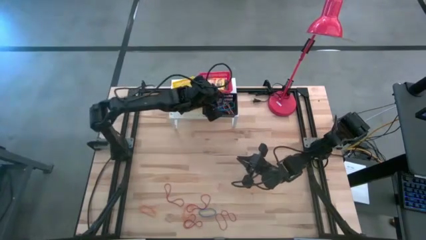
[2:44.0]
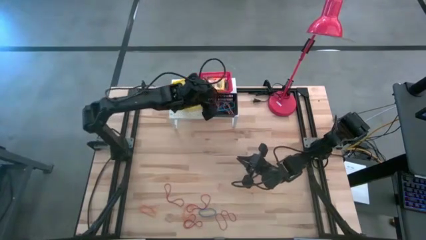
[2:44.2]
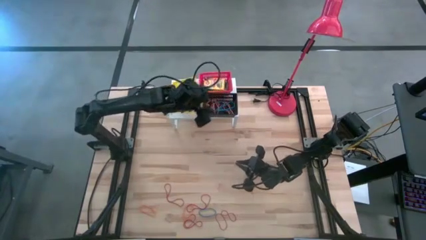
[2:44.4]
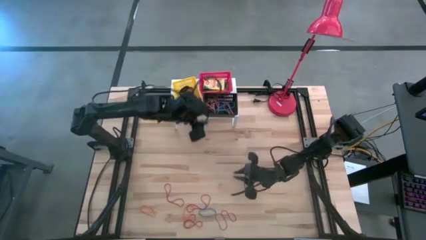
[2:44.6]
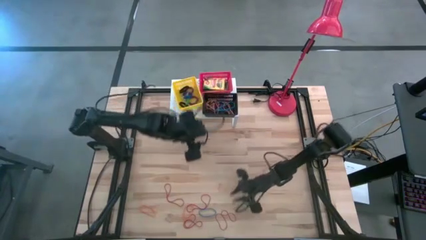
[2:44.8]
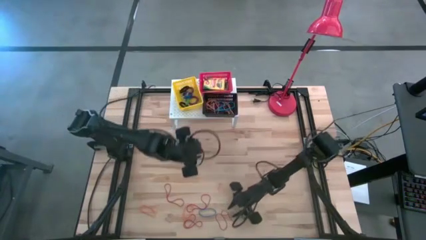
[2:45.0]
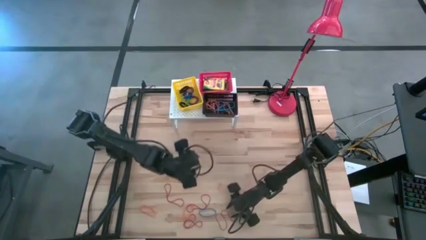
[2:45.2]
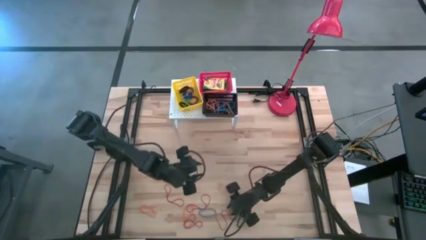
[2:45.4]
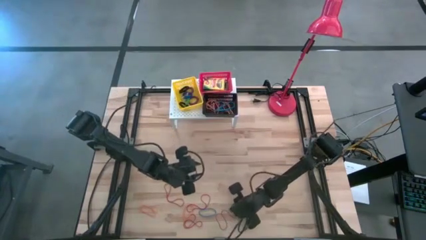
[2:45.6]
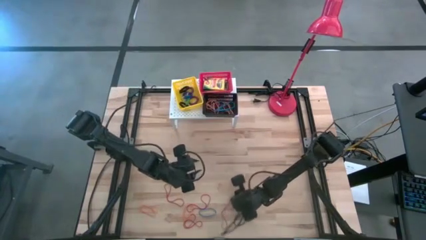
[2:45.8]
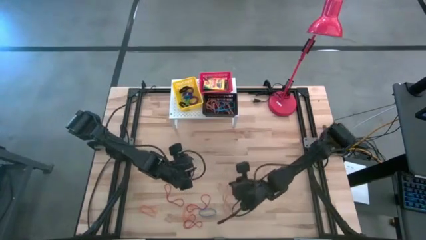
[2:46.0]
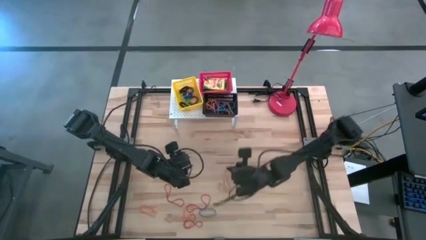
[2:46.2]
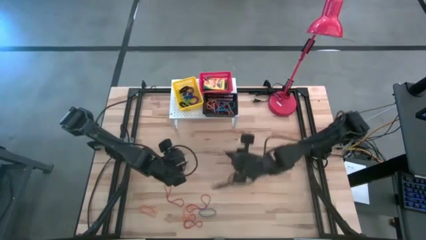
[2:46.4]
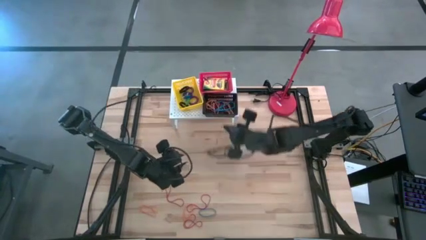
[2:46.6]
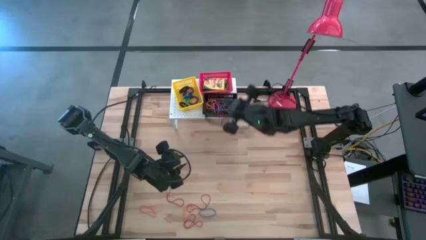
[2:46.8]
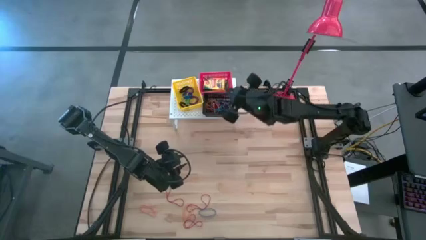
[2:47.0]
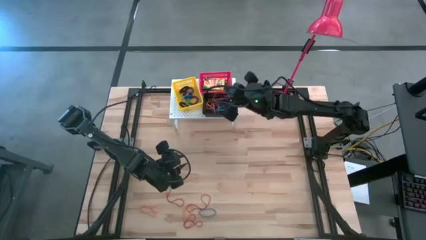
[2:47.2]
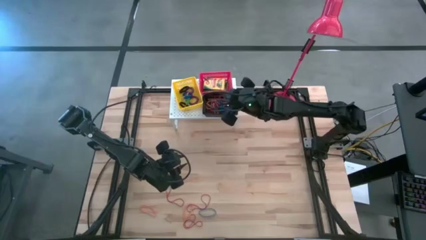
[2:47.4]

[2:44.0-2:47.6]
Task: Pick & Place Office Desk Supplies
Put the red rubber band into the black bin on the shelf

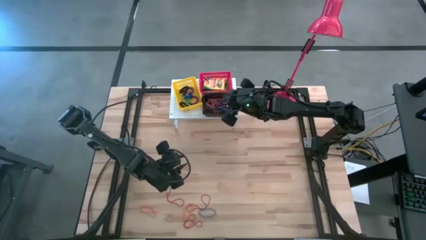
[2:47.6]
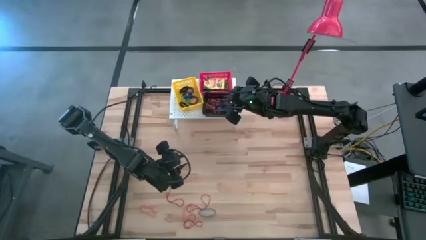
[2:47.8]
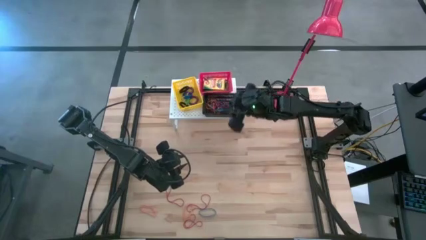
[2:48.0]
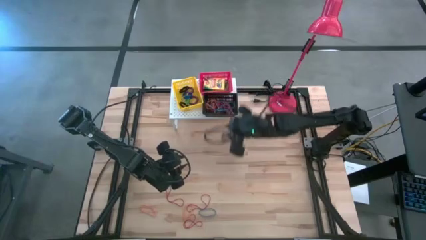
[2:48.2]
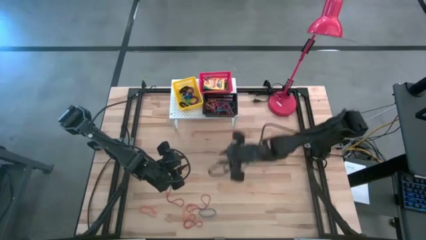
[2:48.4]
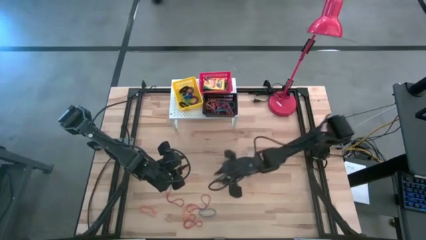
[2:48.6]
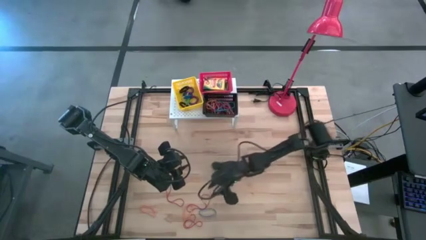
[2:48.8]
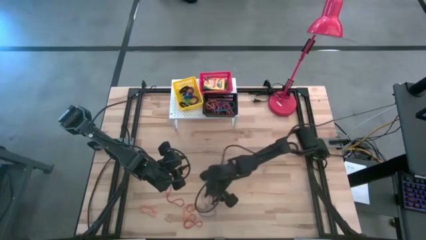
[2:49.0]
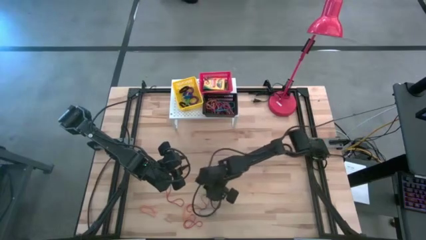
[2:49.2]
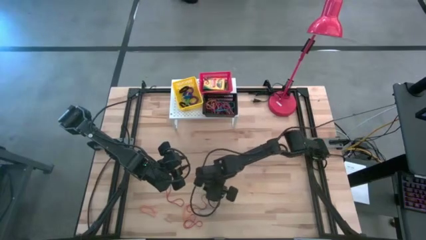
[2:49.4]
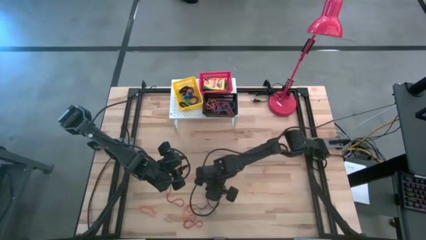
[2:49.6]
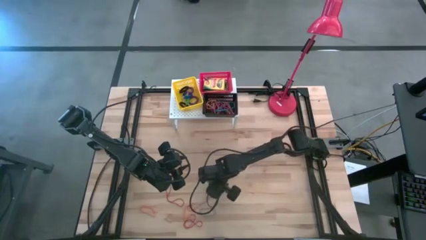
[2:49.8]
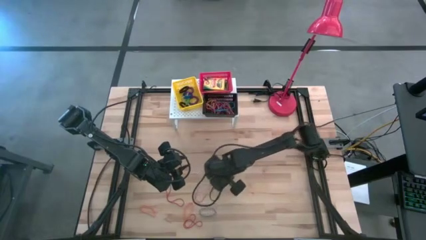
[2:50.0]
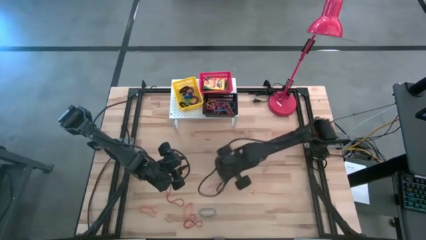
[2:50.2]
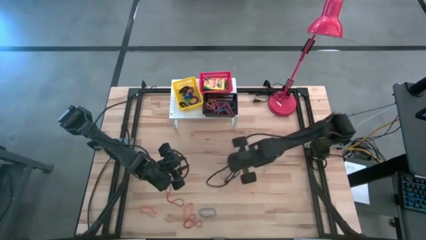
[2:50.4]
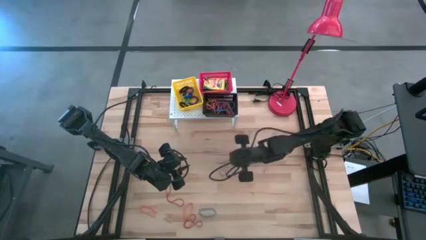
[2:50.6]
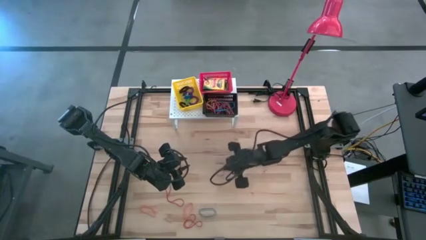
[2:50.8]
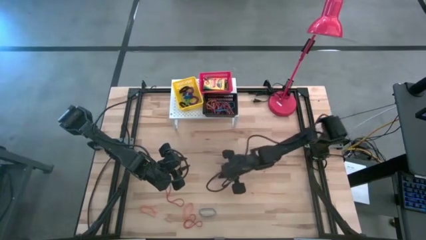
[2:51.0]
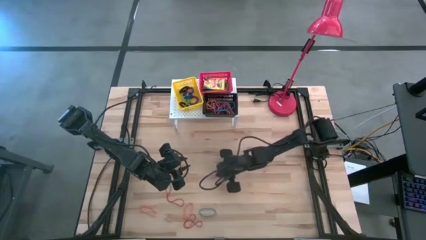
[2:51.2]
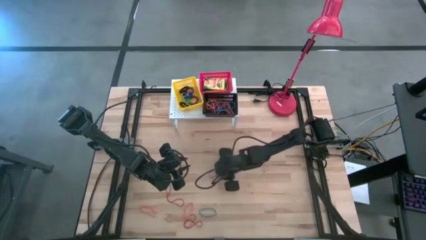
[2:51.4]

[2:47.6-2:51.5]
Put the red rubber band into the black bin on the shelf

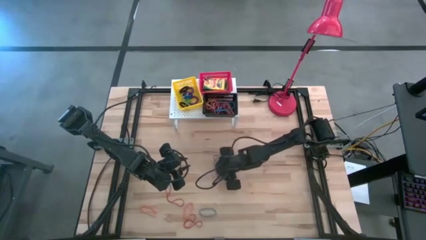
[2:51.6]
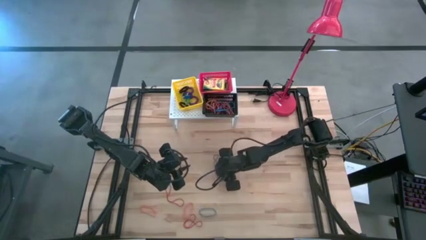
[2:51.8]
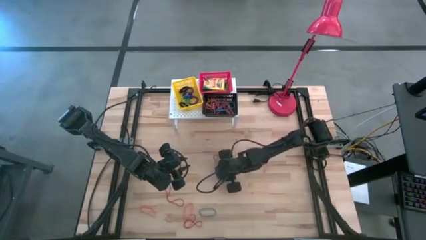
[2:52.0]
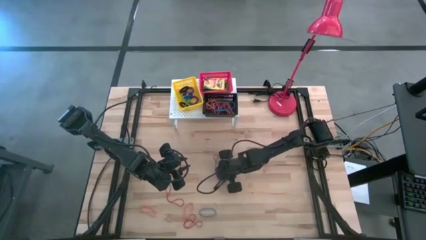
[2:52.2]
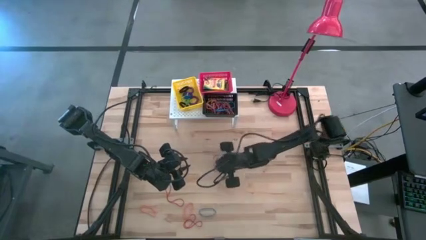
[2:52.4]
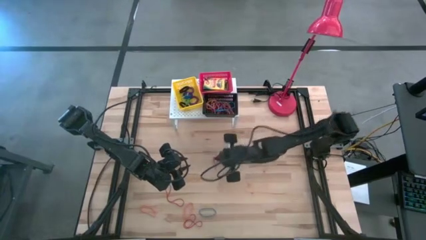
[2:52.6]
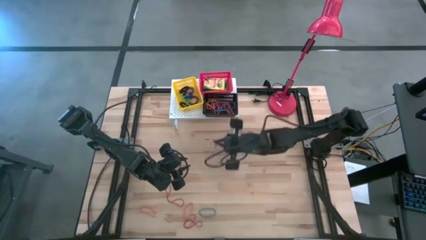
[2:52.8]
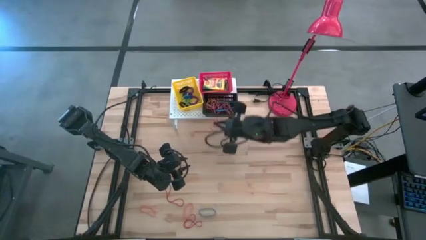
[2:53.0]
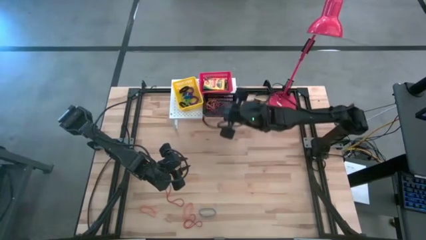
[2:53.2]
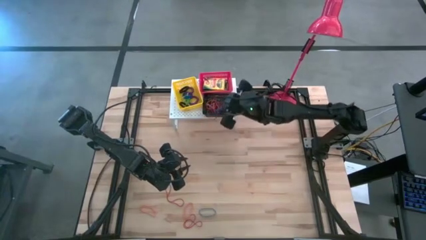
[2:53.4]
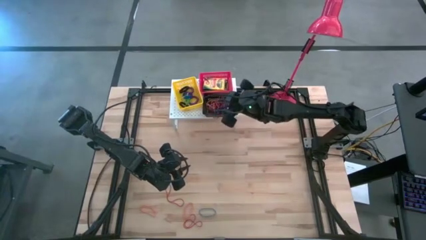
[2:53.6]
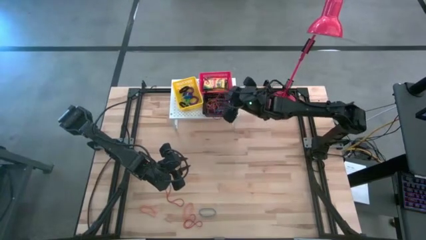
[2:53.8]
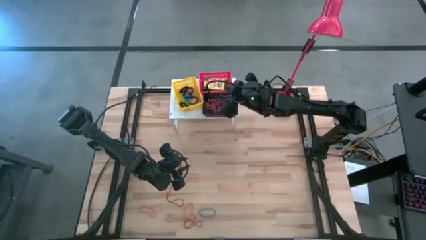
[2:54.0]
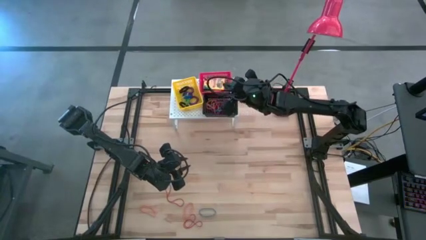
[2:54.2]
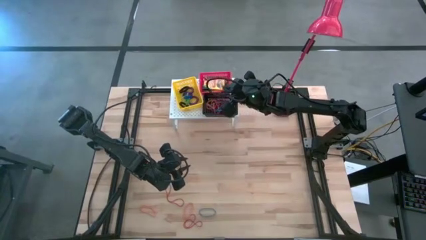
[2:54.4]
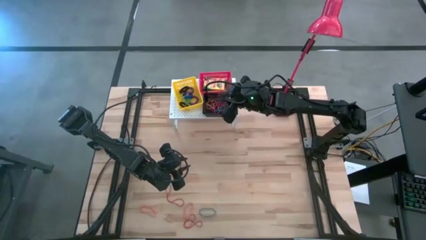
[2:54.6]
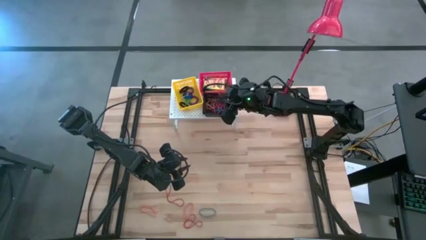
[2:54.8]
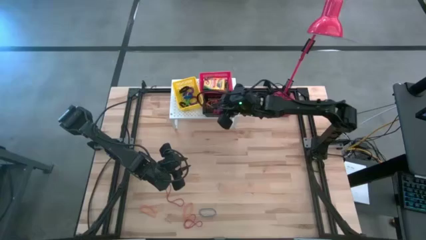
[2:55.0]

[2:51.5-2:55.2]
Put the red rubber band into the black bin on the shelf

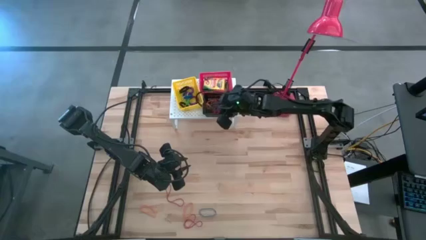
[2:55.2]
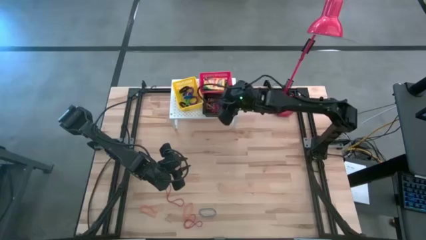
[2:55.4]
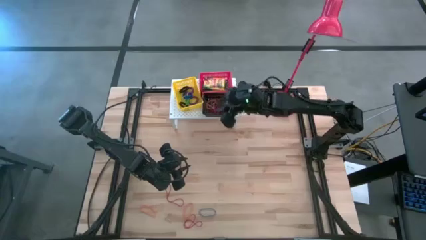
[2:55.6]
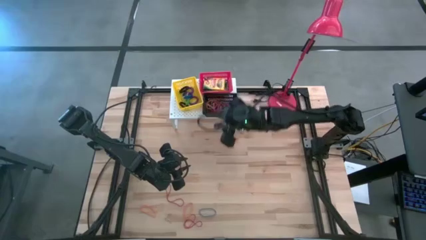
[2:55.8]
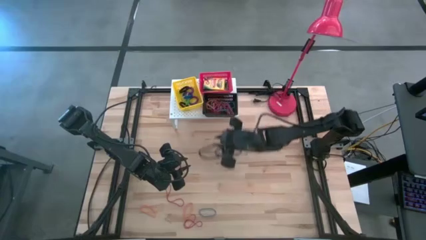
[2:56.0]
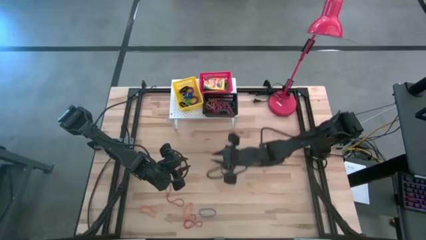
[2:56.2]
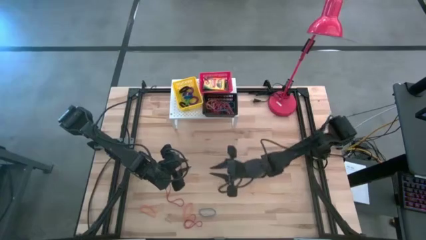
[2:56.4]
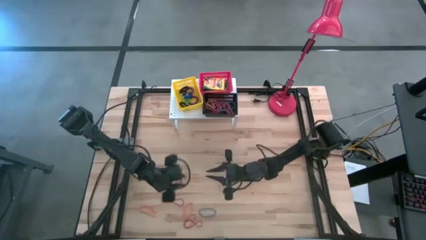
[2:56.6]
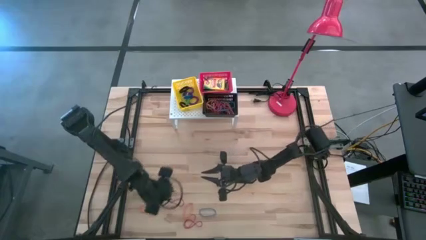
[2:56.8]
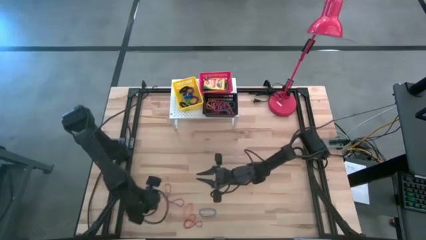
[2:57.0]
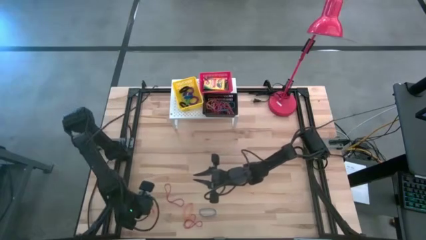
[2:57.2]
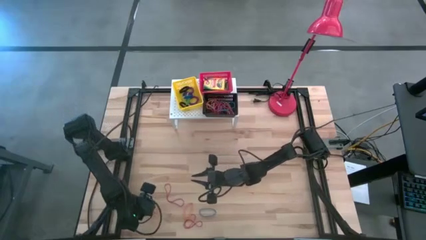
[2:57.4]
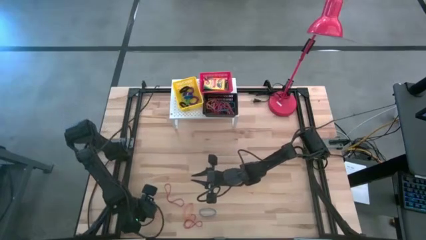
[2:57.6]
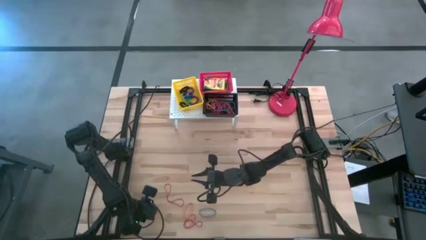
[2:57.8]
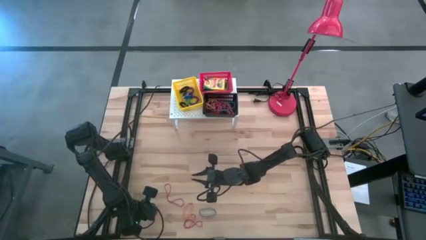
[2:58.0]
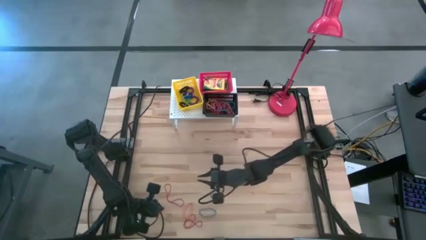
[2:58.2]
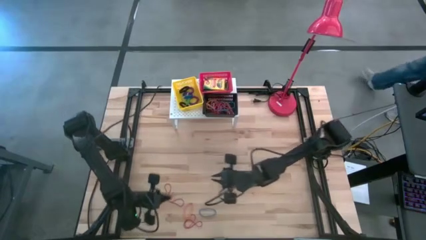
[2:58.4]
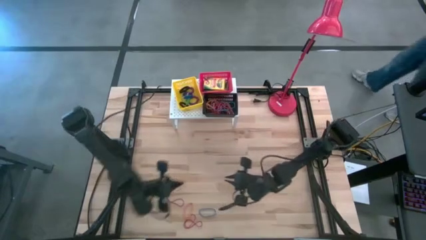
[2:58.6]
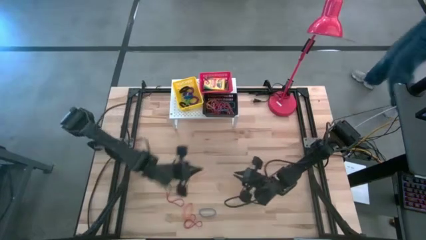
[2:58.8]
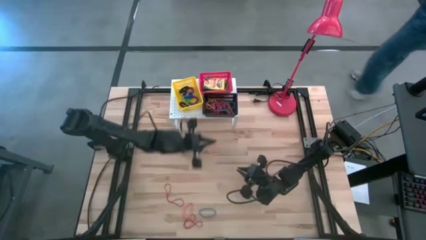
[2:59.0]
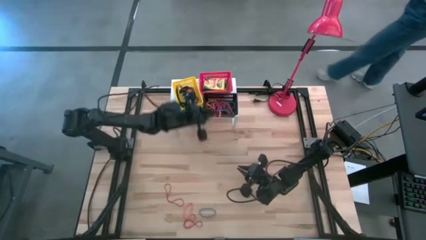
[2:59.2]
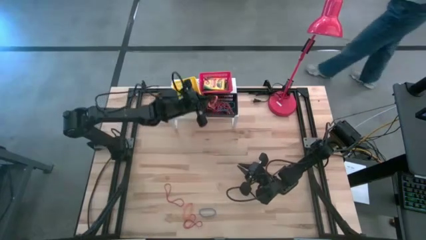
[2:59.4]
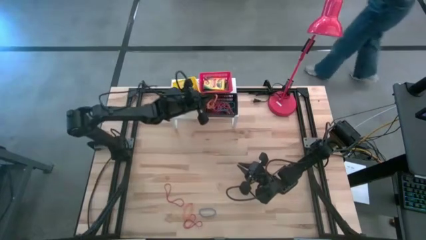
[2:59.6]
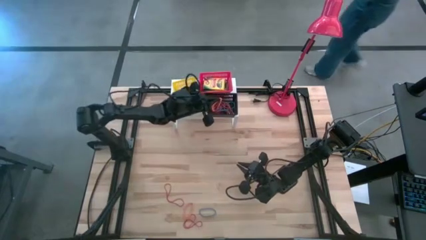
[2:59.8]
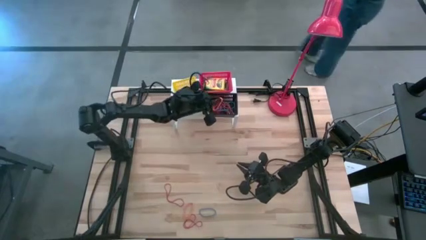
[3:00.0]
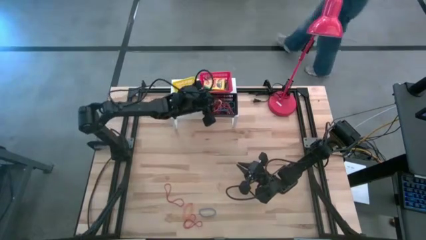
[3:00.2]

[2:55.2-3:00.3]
Put the orange rubber band into the black bin on the shelf

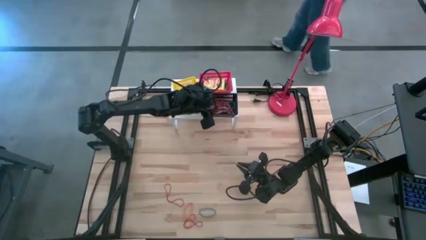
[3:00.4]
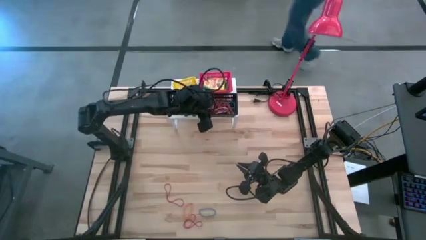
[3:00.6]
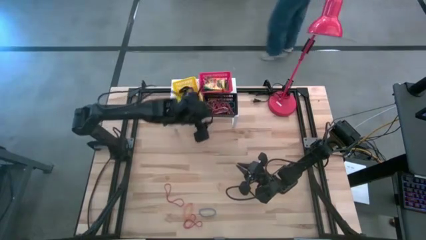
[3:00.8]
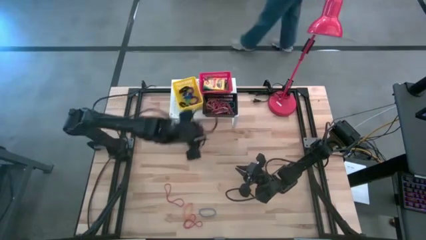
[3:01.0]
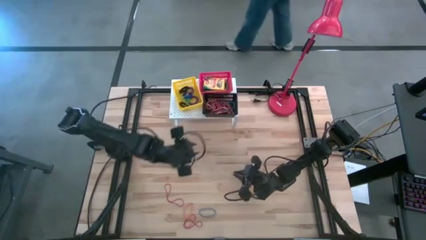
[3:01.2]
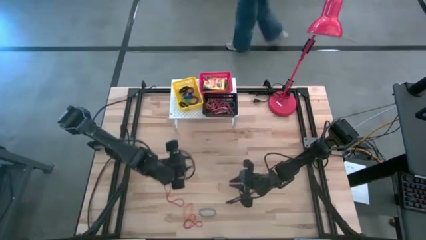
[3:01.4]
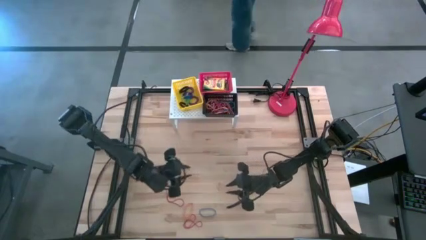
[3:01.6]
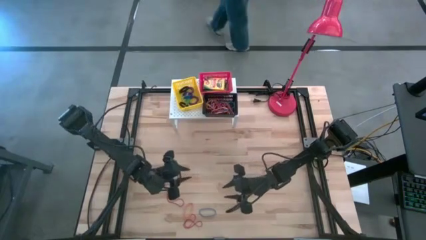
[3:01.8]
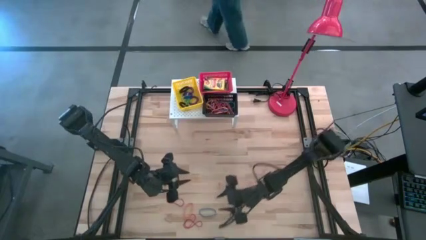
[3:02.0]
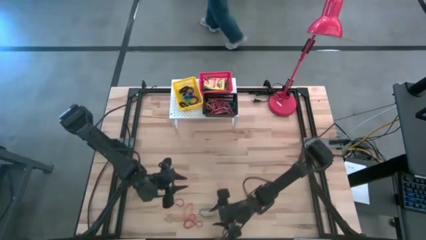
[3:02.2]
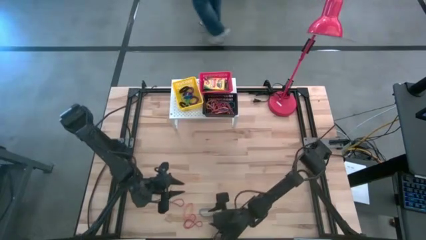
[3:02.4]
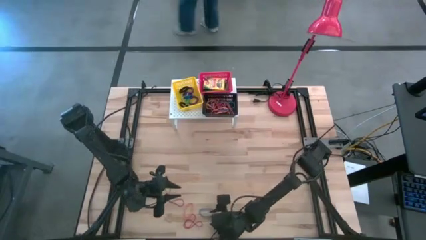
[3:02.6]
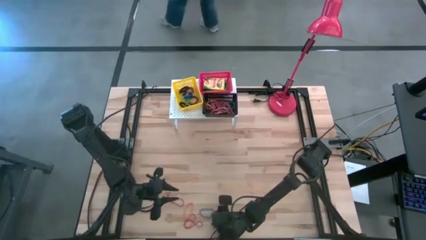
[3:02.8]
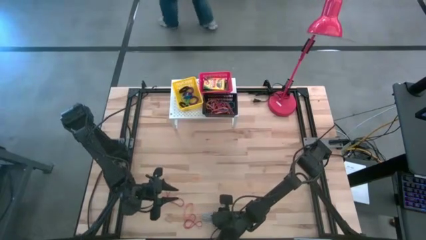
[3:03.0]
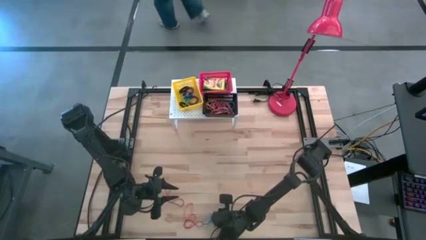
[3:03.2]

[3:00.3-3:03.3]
Put the blue rubber band into the black bin on the shelf
